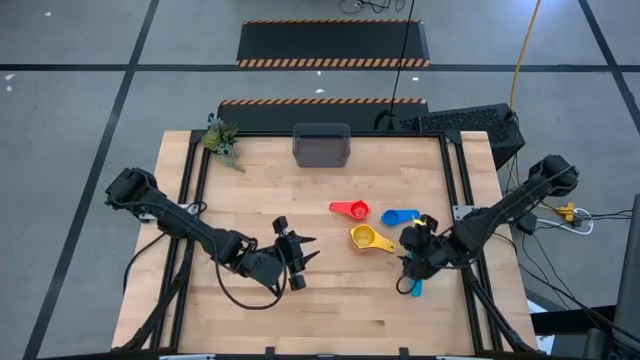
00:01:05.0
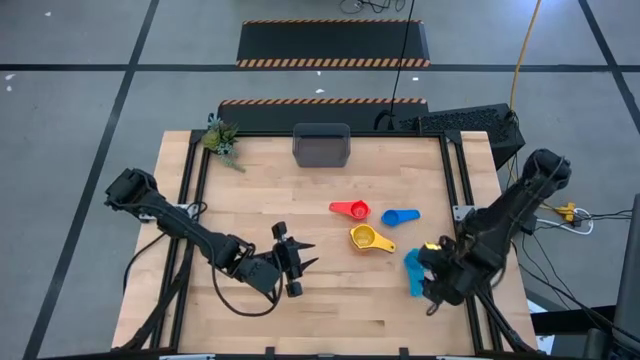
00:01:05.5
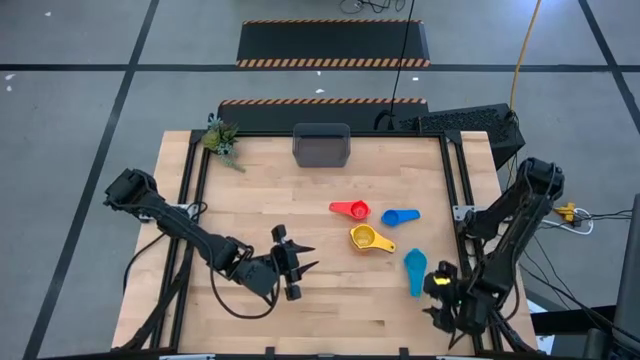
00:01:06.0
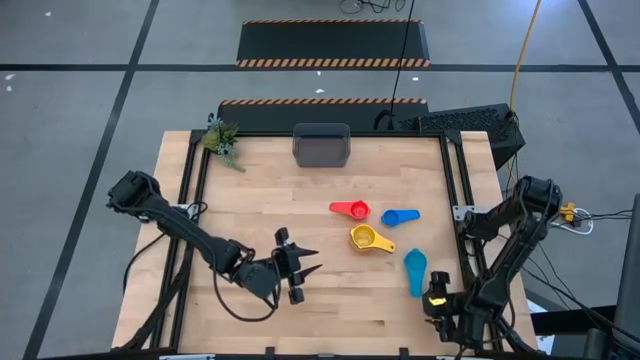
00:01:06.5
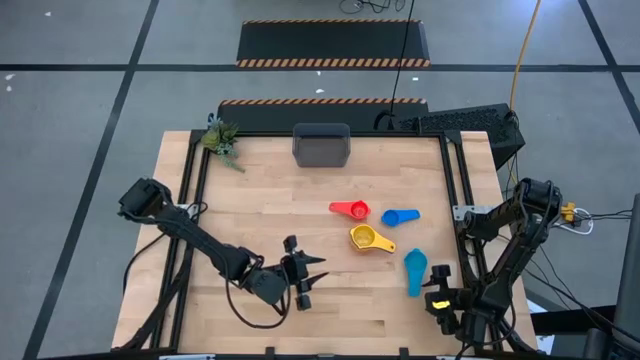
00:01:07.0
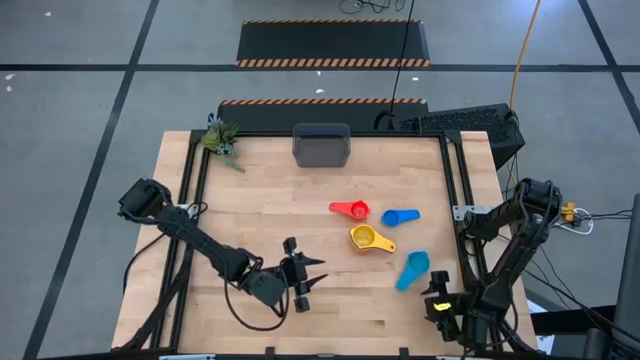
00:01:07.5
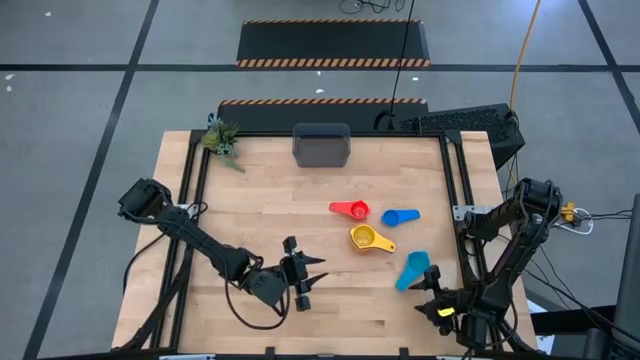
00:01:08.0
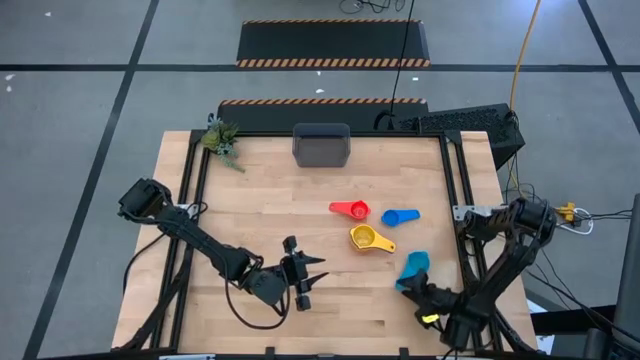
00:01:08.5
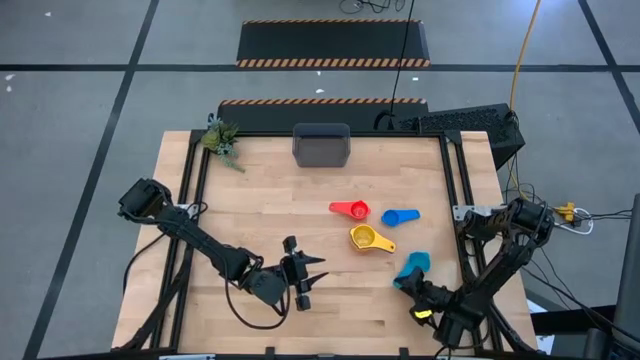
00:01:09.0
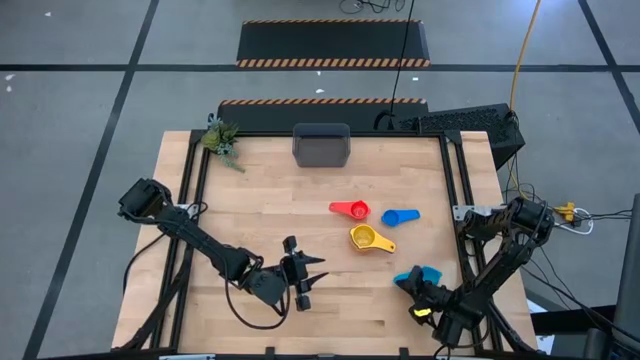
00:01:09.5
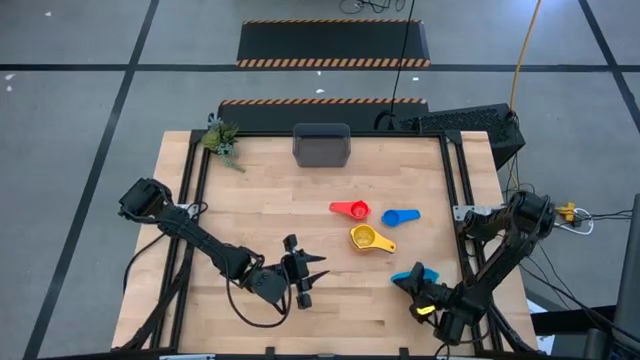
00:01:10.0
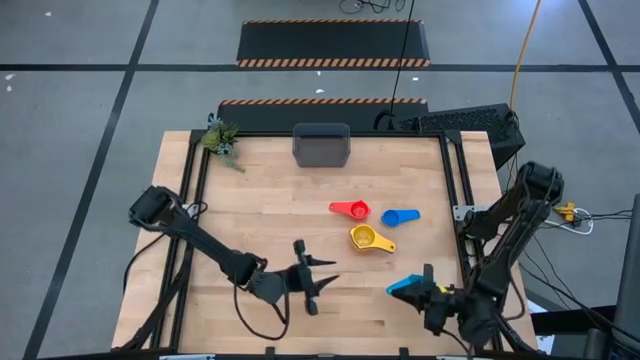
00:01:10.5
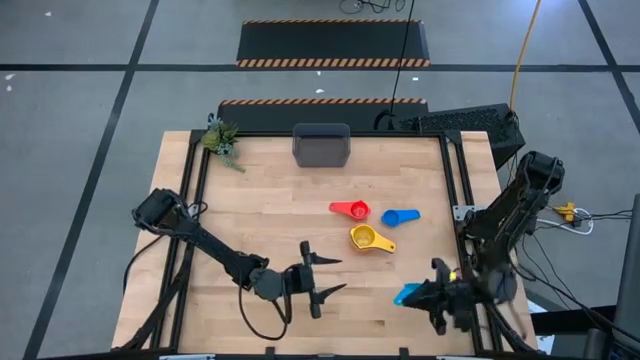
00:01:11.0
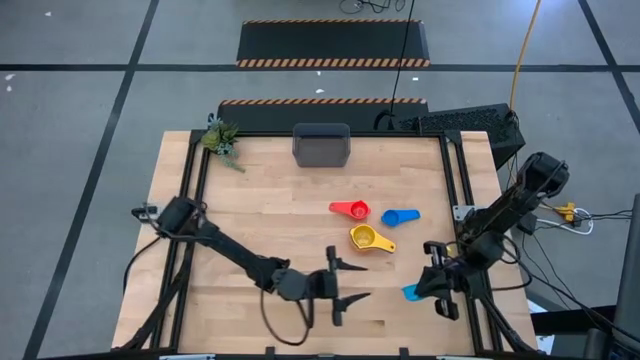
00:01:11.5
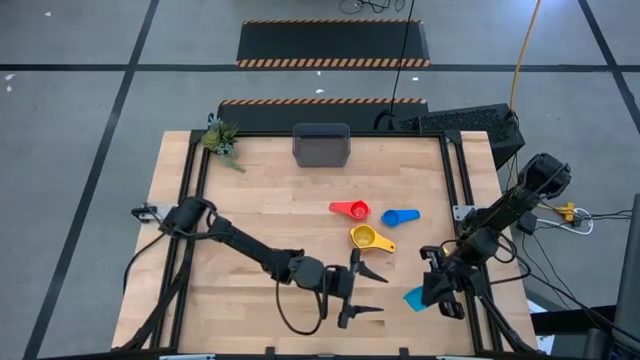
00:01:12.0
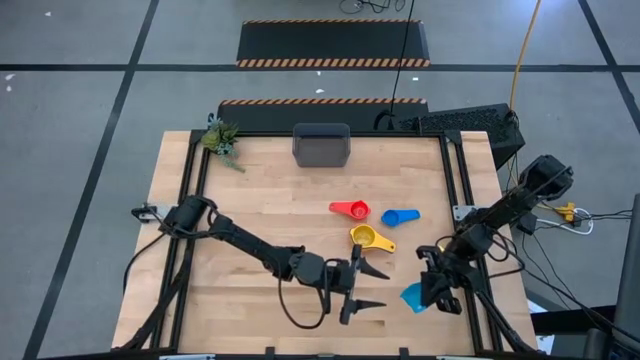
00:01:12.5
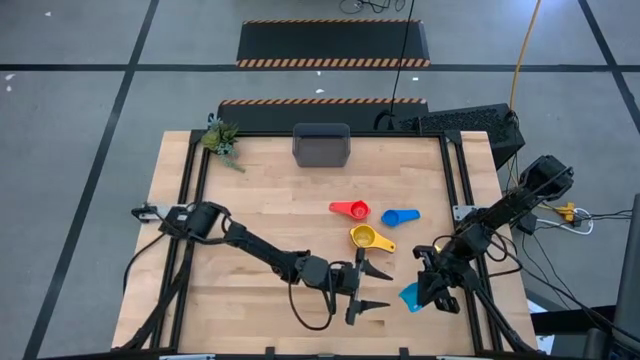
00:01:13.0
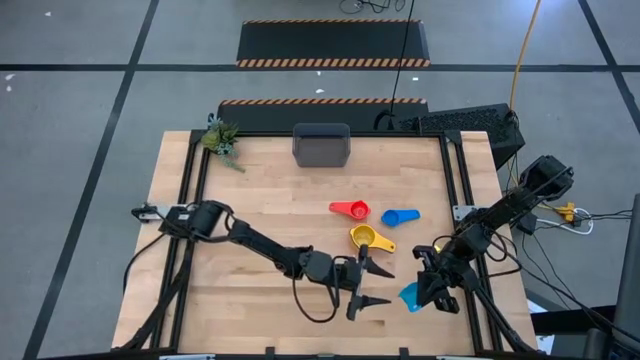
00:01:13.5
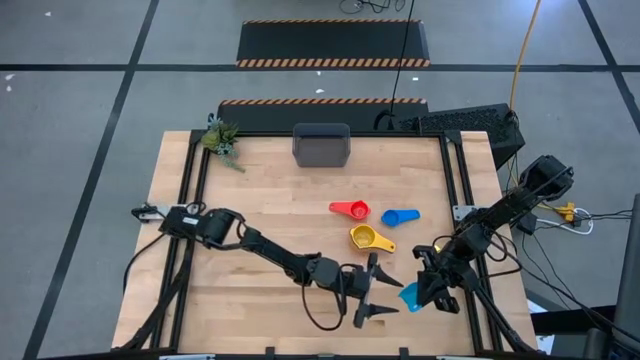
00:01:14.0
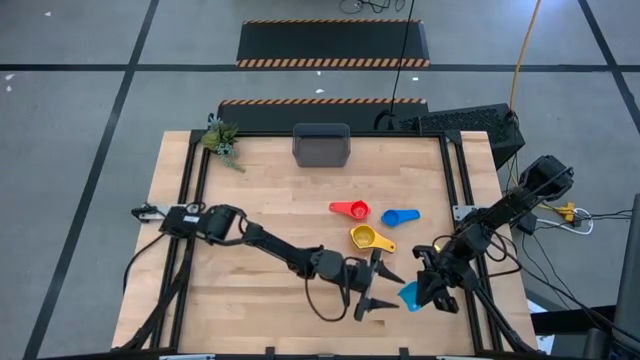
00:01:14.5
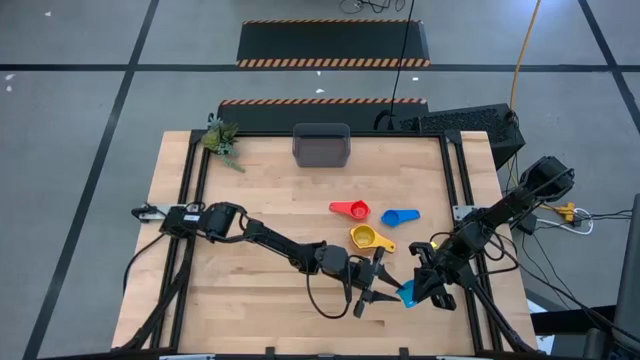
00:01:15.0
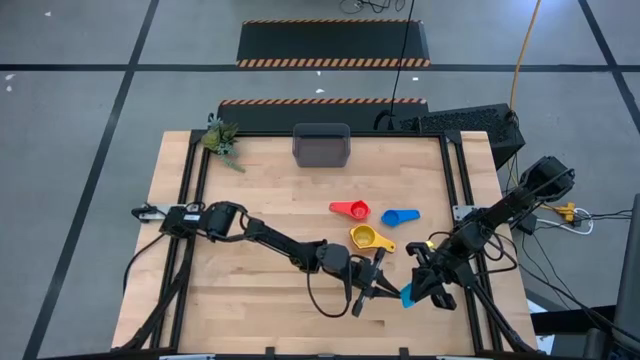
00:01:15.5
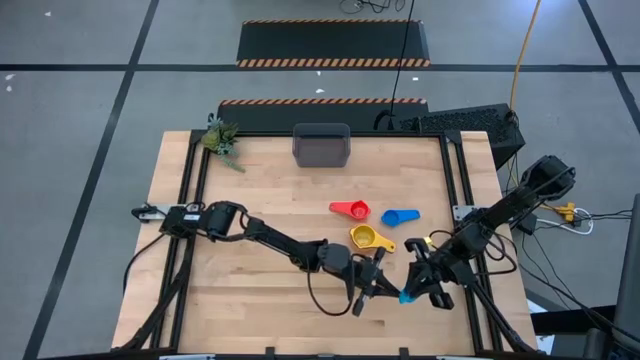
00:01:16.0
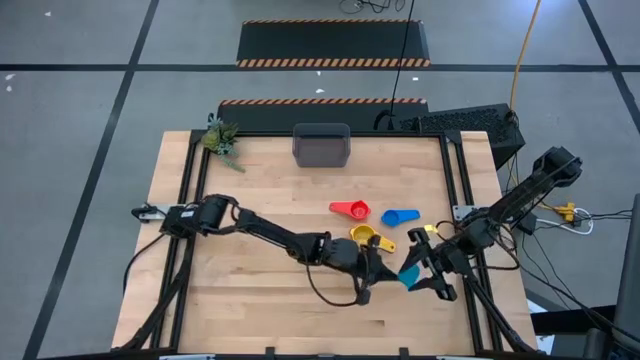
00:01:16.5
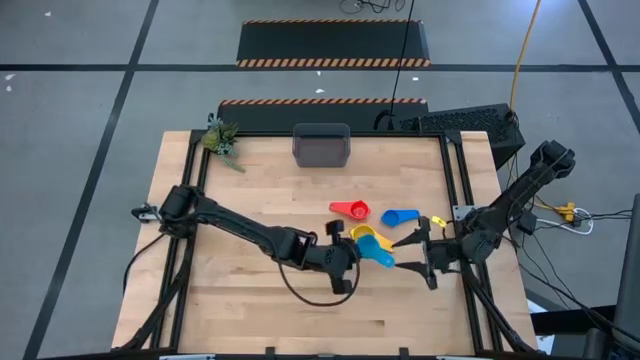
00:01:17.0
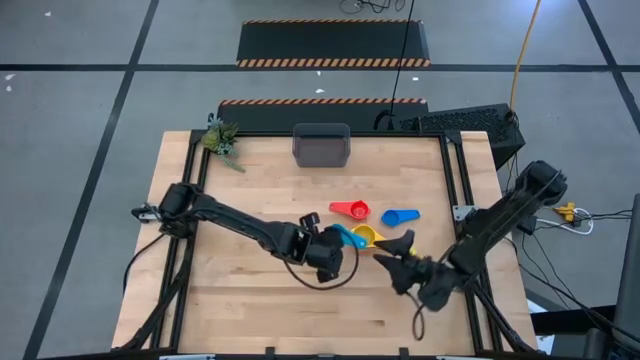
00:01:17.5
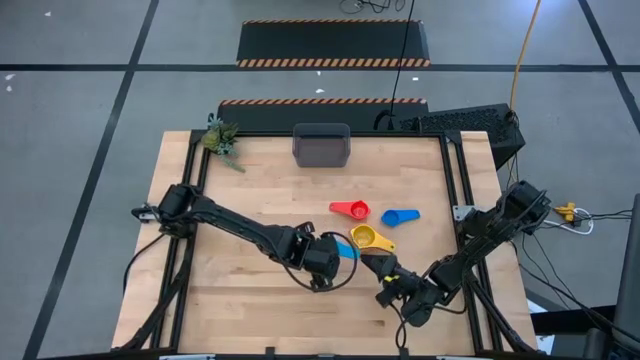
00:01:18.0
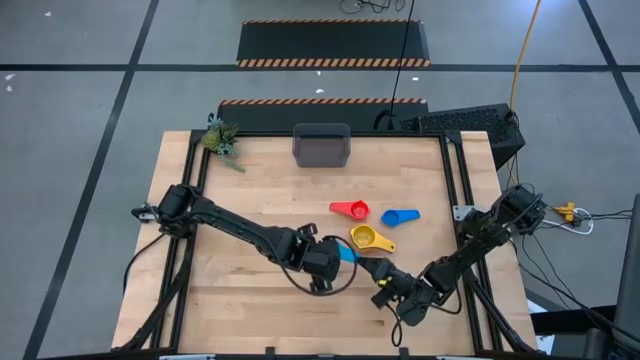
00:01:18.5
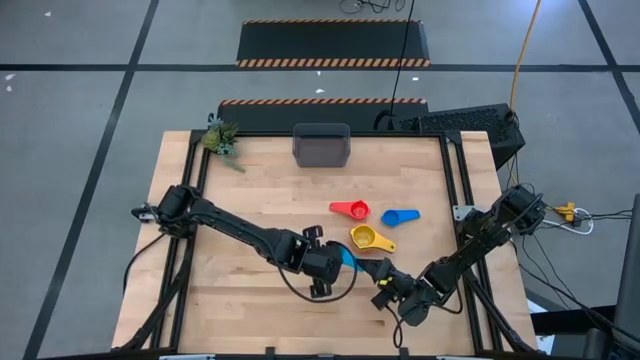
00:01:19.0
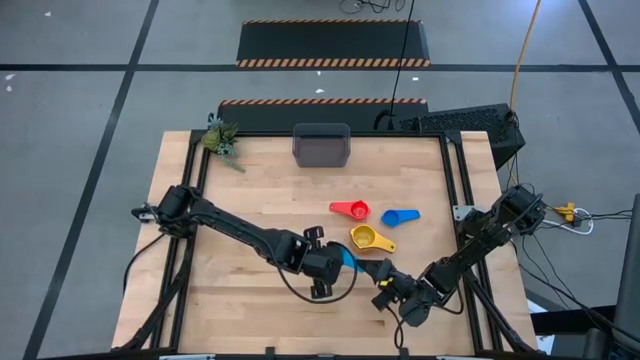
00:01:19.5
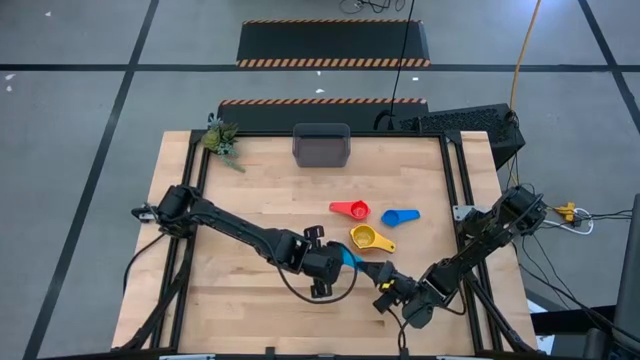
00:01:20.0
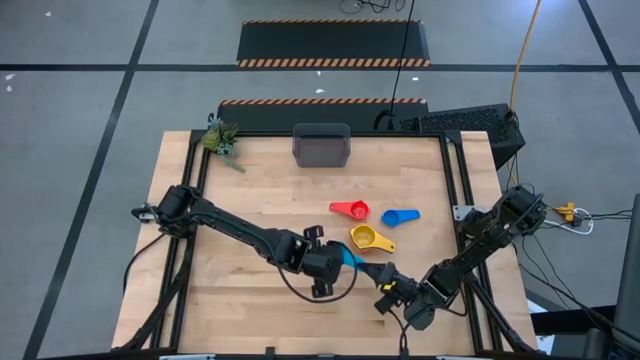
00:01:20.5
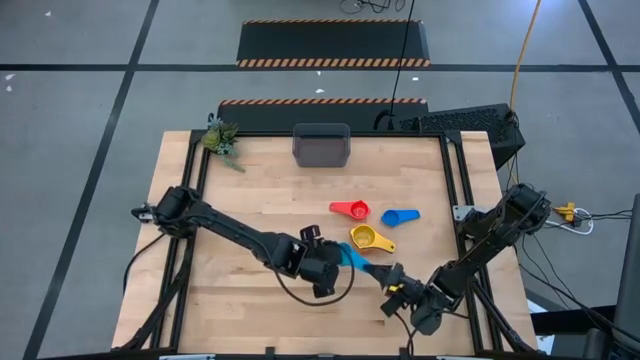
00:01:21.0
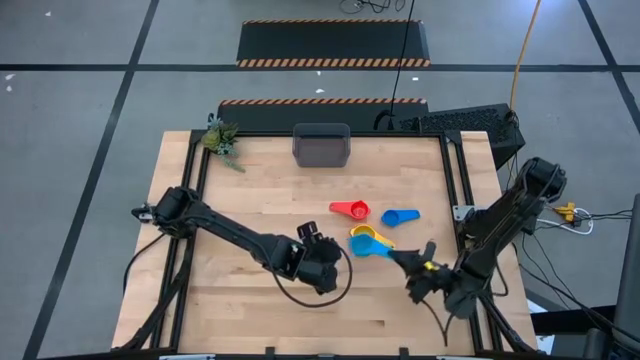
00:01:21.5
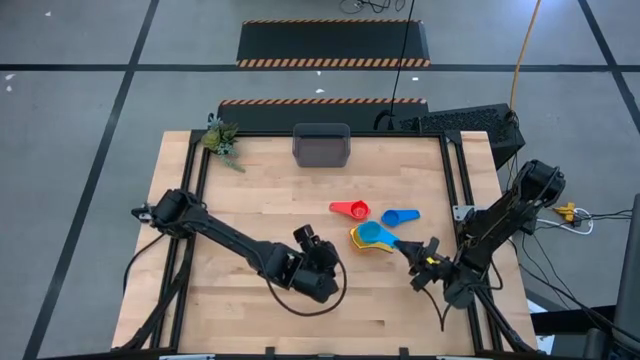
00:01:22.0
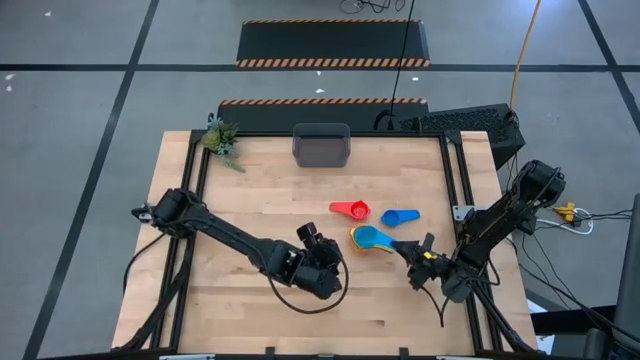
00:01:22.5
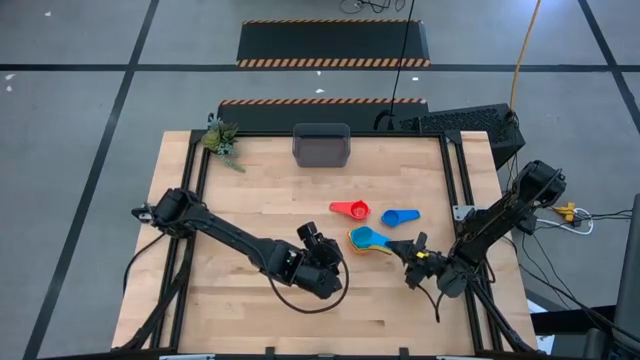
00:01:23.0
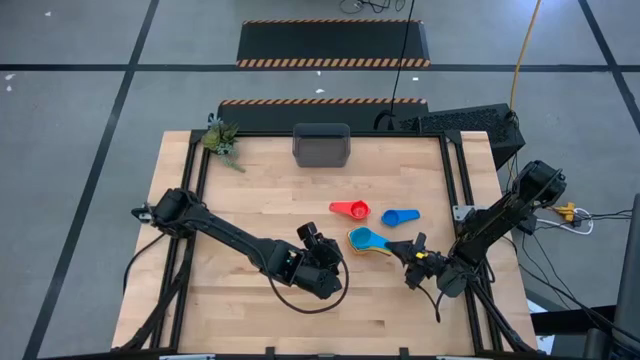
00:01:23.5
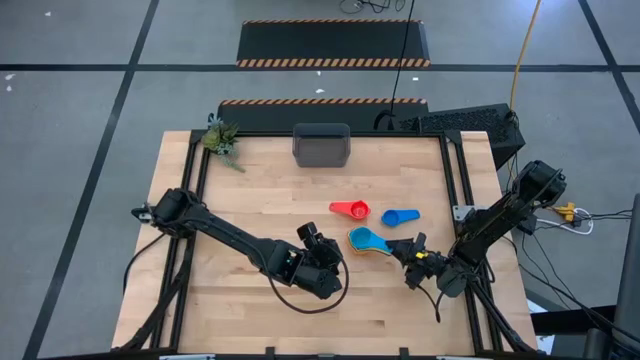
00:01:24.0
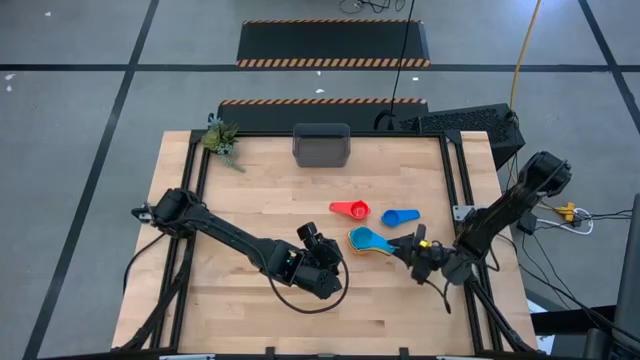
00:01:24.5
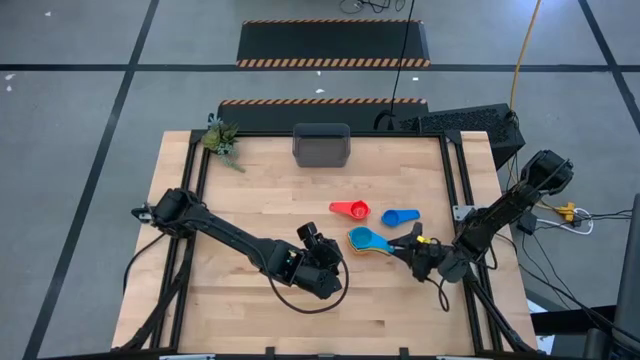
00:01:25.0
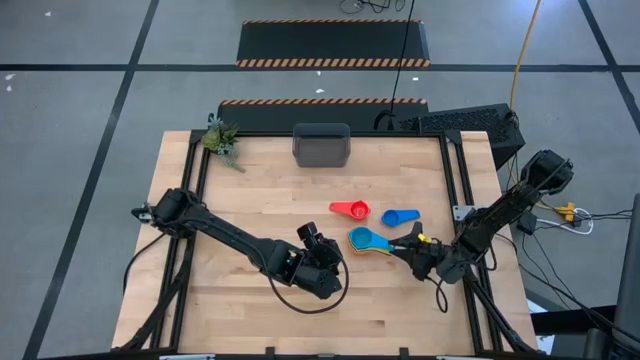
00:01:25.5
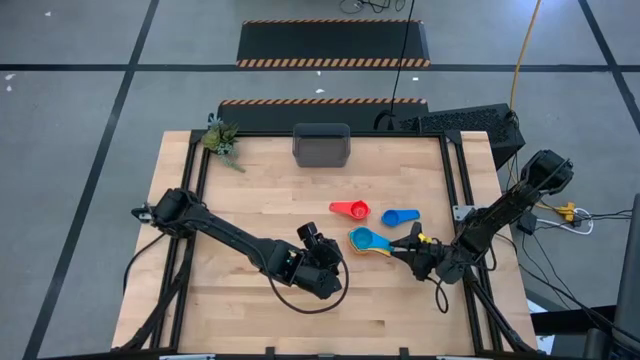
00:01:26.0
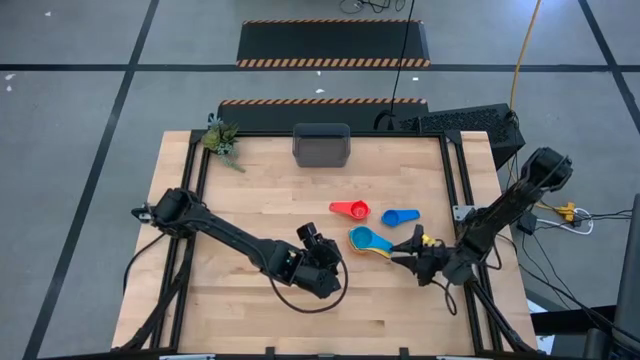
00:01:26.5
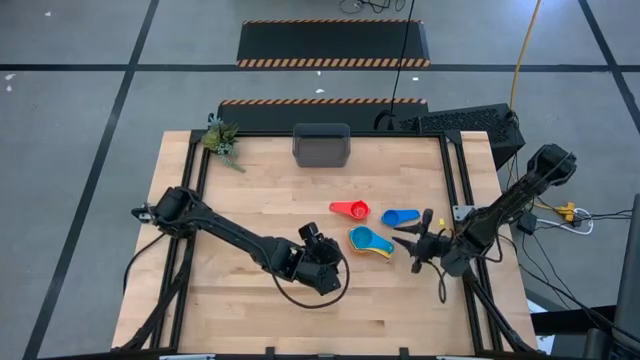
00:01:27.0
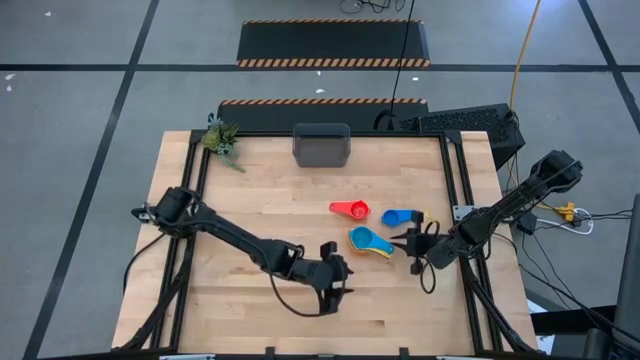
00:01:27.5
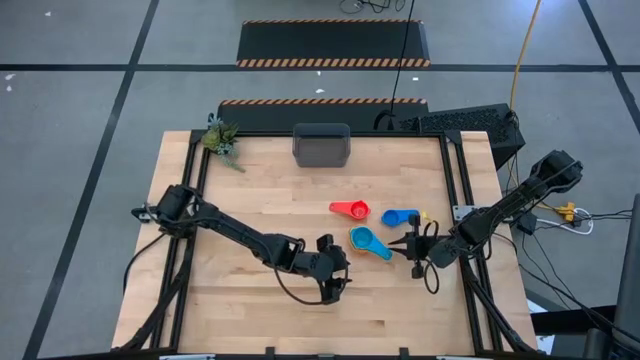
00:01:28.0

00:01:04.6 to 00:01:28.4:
Task: Nest measuring cups in basket
Stack the light blue measuring cup on top of the yellow measuring cup
